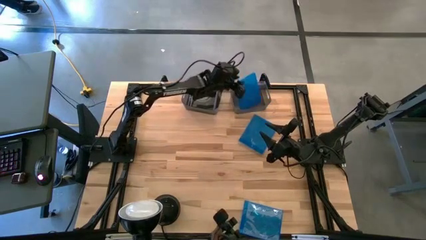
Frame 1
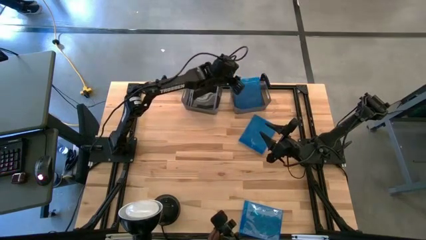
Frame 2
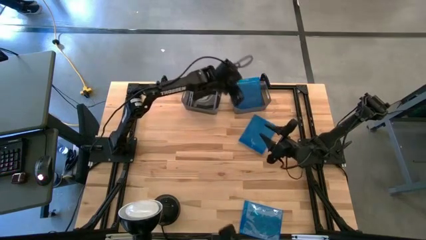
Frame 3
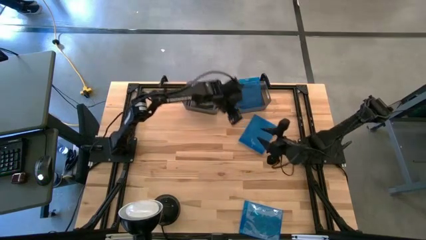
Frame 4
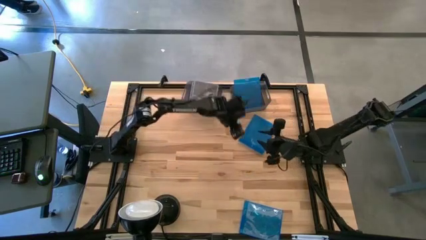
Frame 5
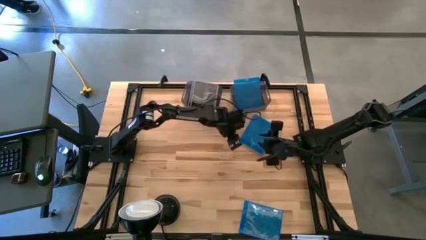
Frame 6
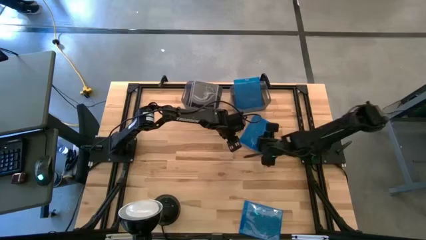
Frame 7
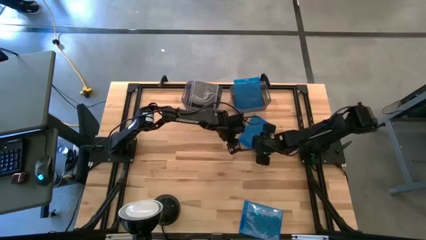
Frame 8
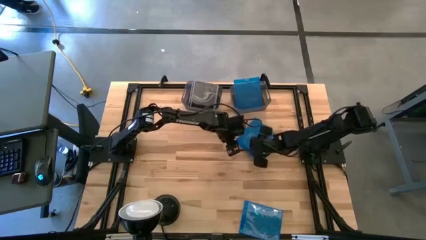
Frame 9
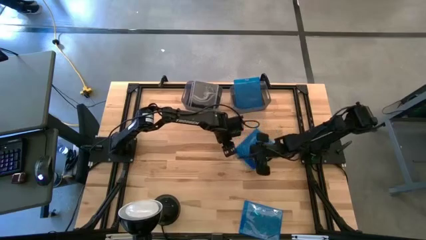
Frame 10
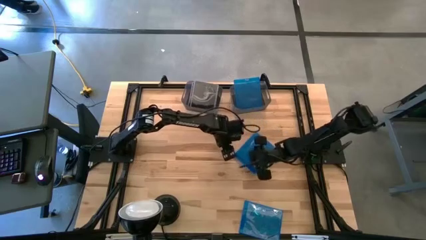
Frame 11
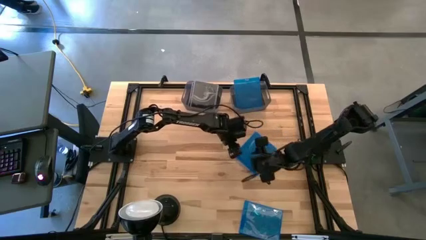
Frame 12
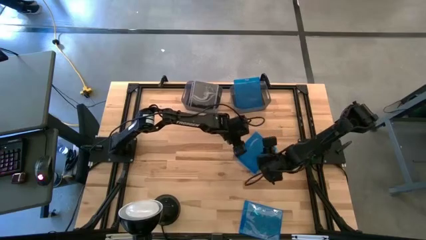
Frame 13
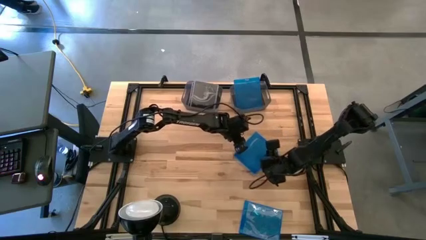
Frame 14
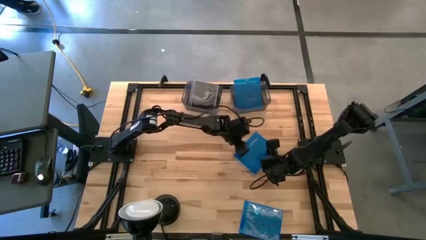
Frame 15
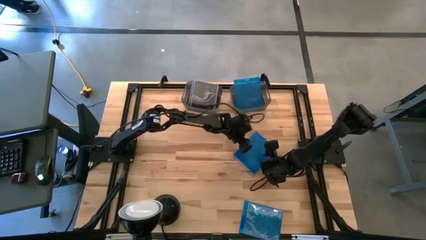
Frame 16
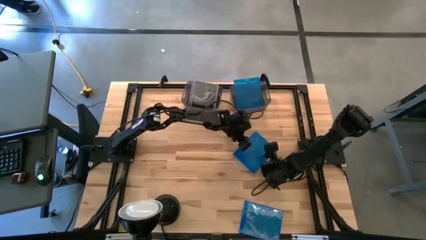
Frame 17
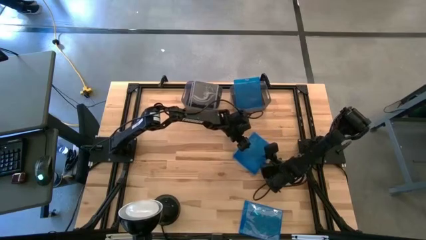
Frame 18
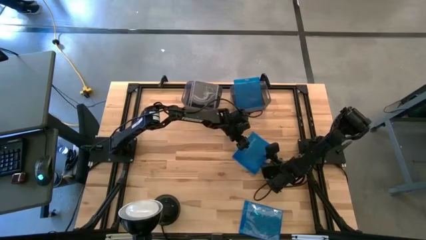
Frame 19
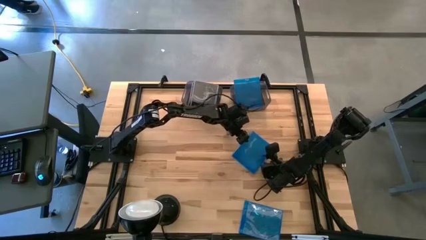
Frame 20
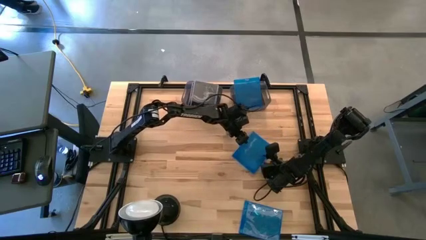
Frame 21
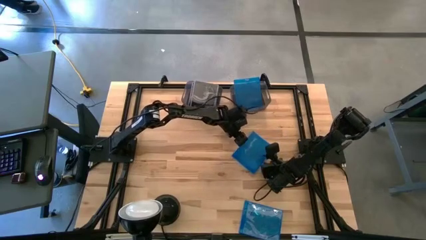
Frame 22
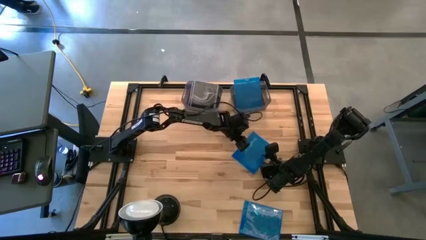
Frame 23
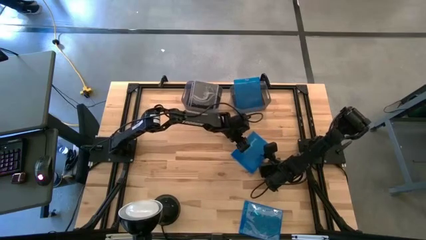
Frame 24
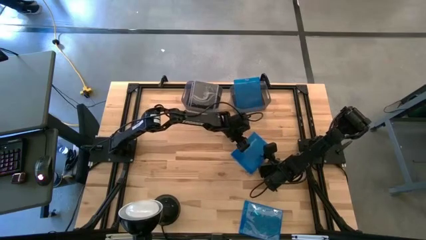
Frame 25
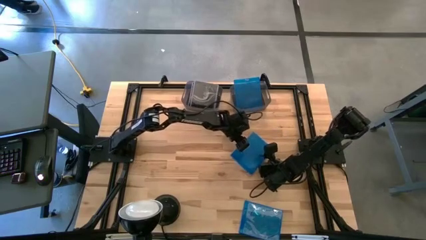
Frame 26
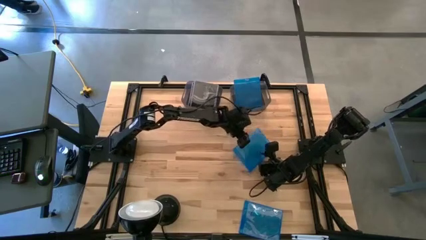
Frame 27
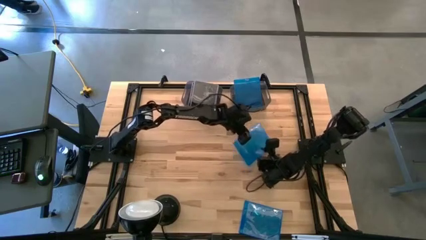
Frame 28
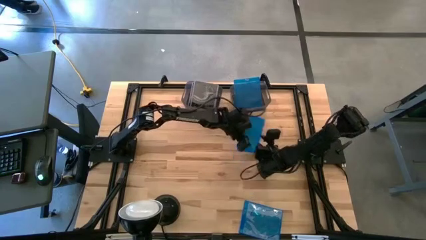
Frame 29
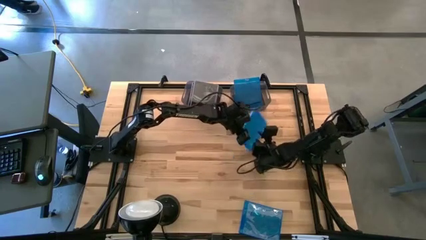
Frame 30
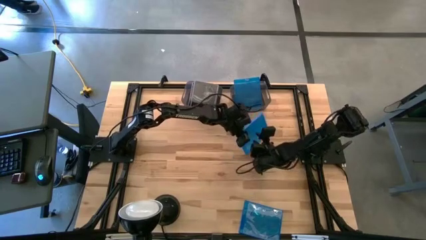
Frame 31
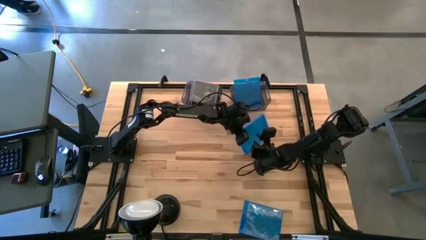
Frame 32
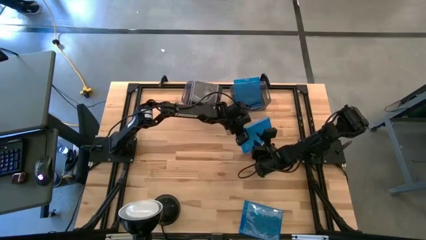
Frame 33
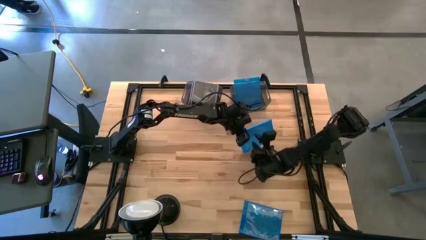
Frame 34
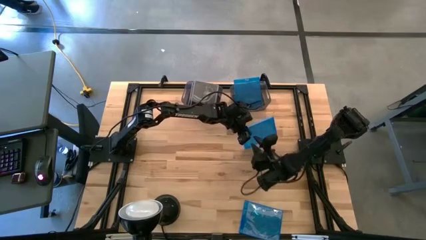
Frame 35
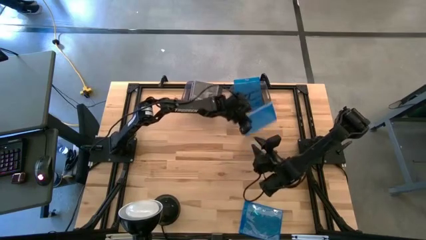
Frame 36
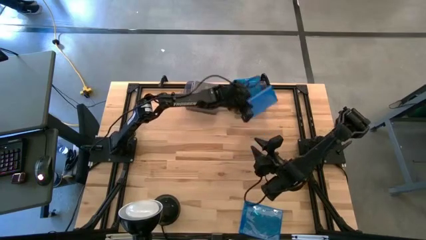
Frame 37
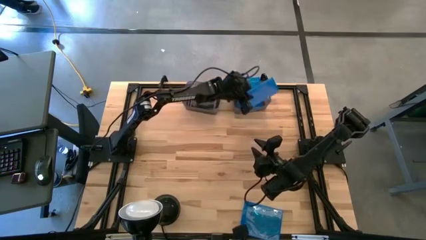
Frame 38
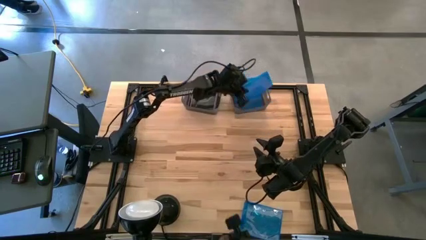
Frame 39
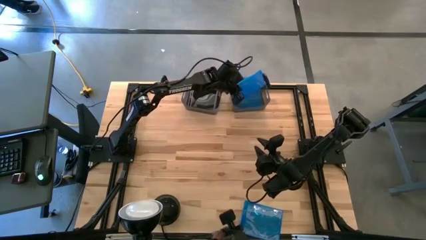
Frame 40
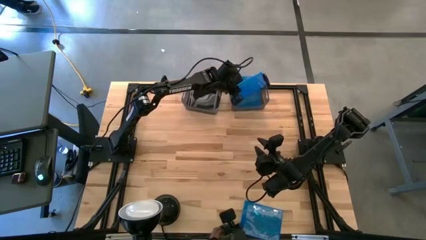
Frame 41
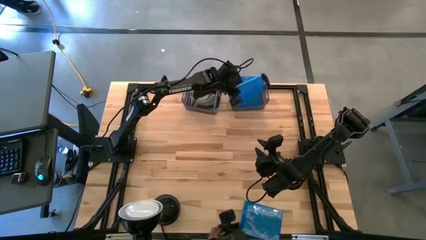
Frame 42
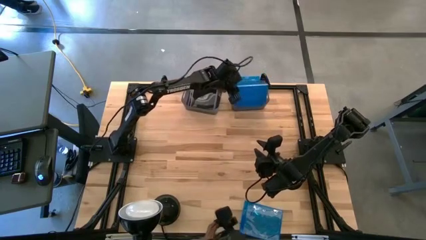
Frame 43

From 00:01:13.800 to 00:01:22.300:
Task: Pick & place jewel cases by type
Put the top blue cd case into the right black bin

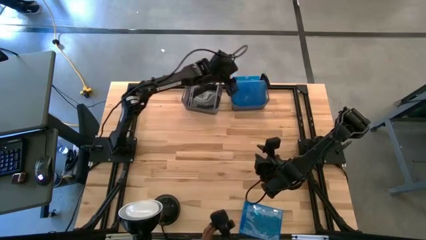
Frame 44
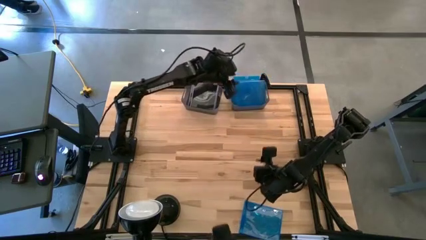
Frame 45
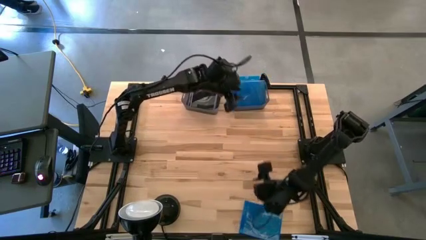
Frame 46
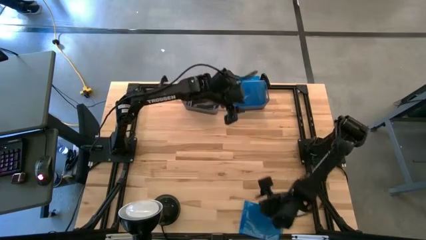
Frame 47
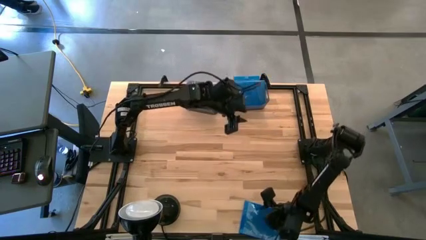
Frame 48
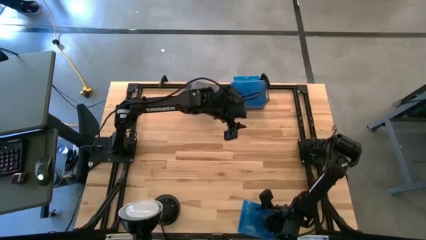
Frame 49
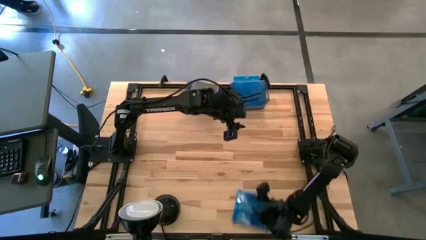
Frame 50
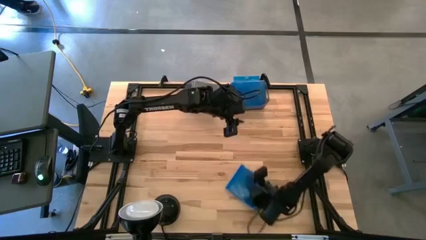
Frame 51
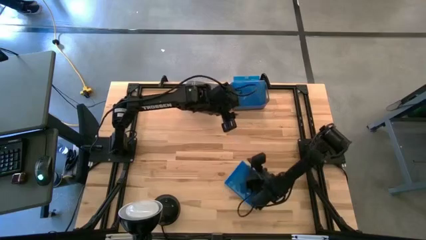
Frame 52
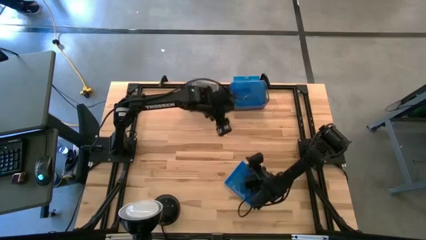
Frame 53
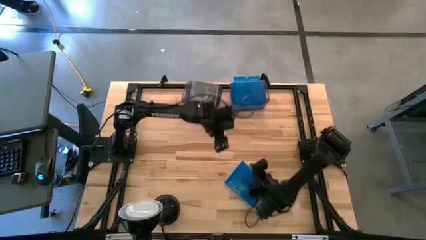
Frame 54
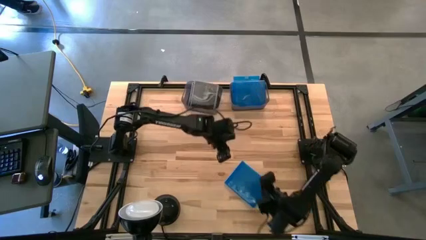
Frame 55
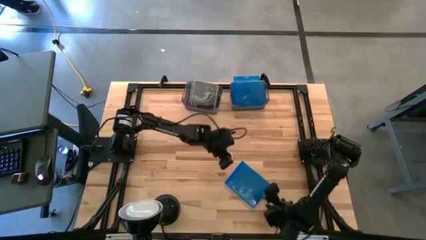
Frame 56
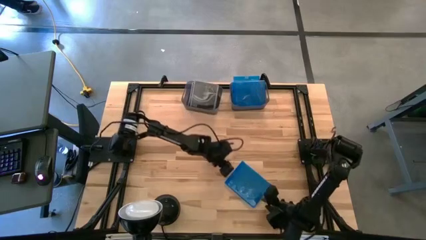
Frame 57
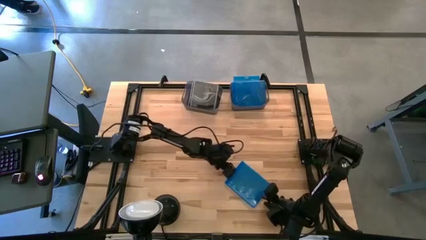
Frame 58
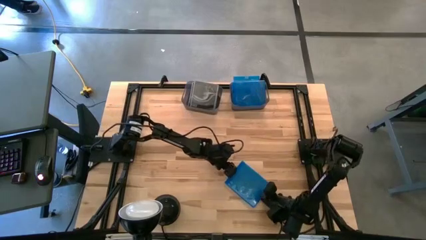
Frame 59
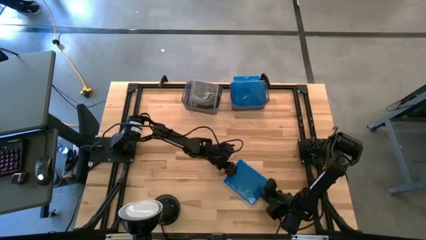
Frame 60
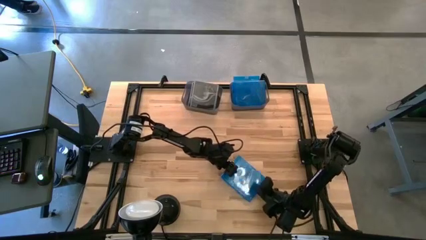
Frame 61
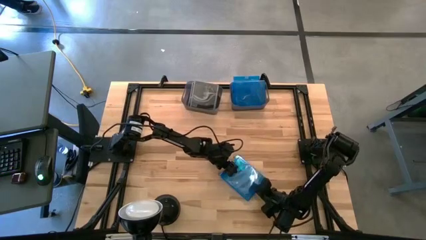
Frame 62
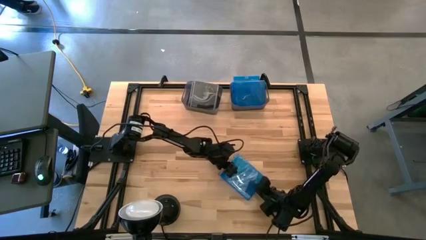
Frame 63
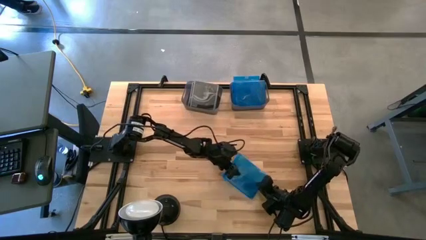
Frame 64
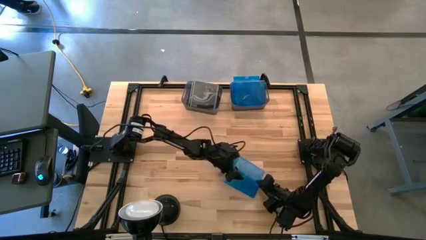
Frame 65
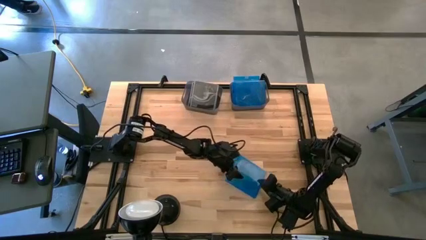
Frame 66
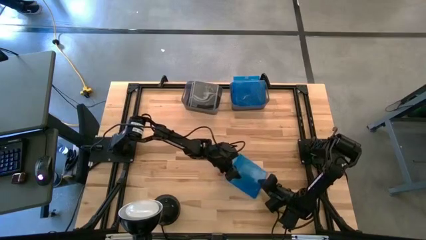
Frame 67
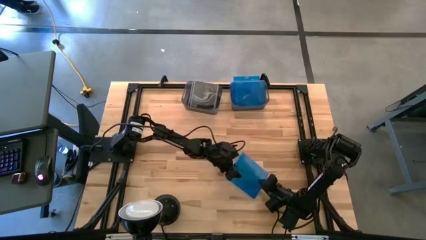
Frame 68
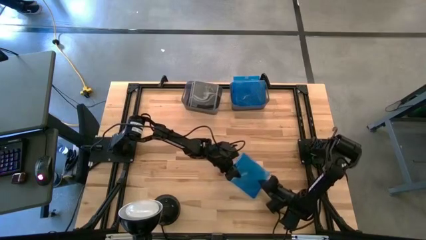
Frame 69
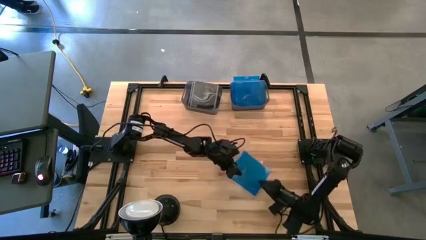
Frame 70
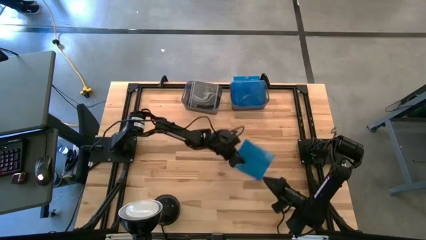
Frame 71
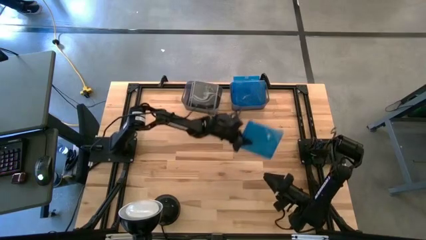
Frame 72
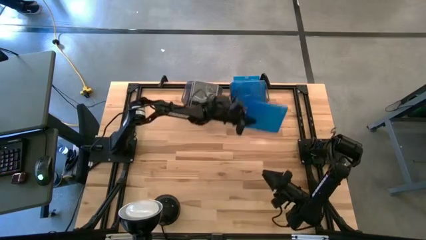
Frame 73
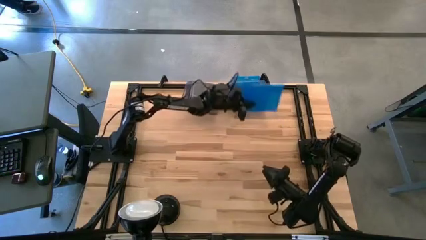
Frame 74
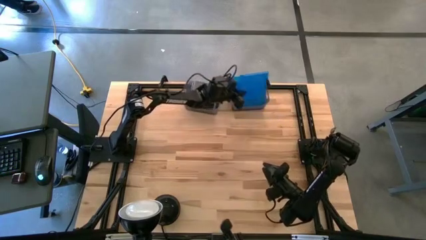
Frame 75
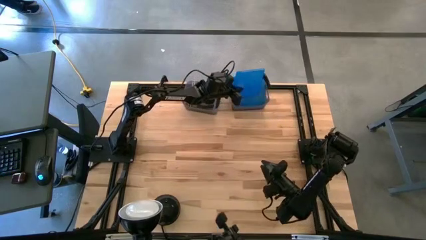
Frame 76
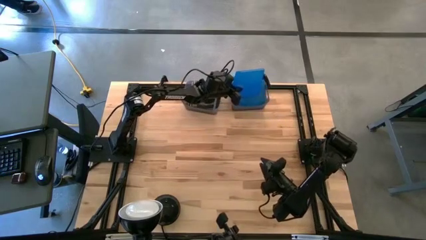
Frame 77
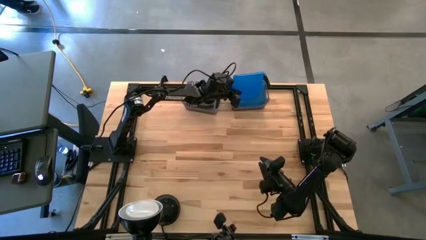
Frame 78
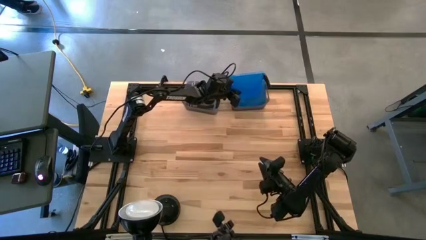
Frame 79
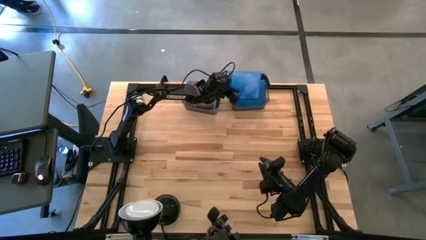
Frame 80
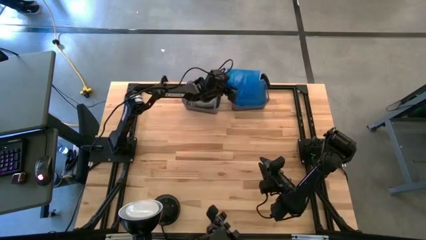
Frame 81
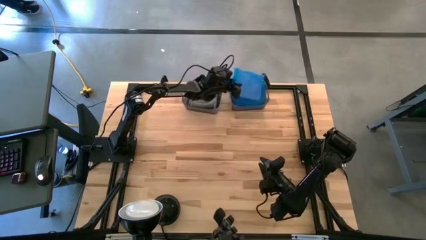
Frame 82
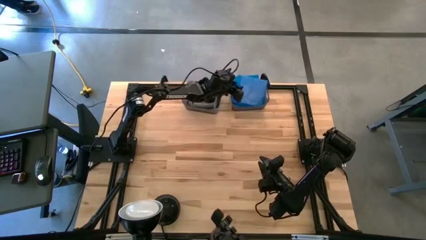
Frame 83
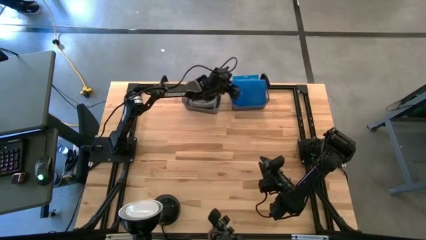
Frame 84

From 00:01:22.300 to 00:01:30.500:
Put the blue cd case into the right black bin
